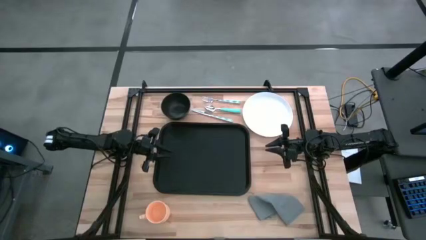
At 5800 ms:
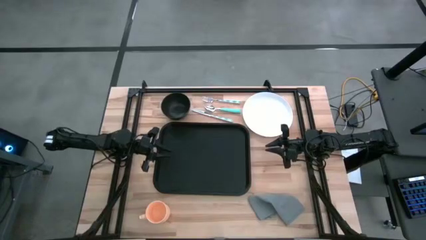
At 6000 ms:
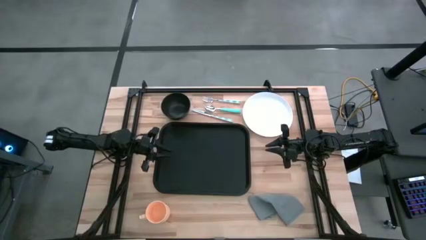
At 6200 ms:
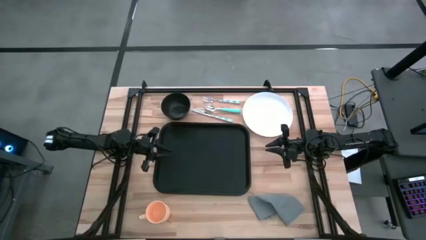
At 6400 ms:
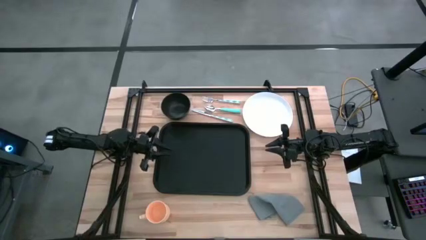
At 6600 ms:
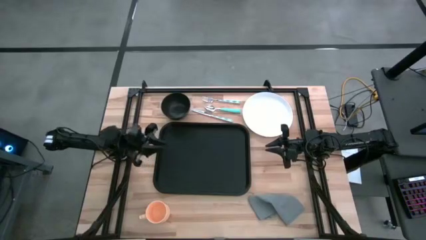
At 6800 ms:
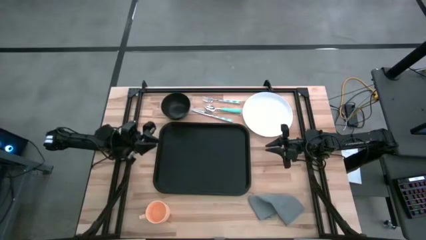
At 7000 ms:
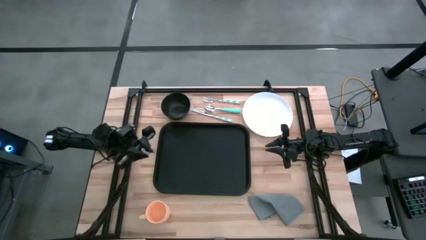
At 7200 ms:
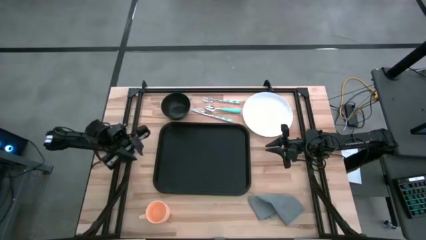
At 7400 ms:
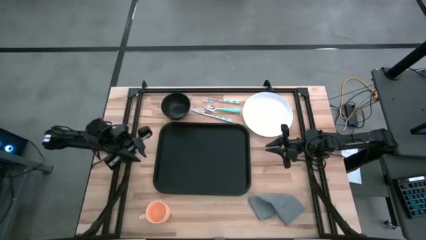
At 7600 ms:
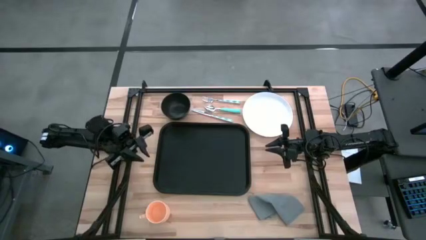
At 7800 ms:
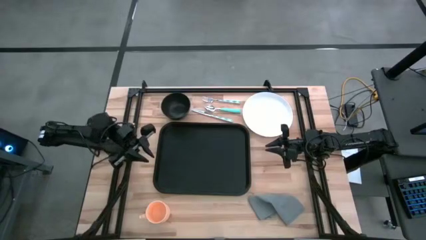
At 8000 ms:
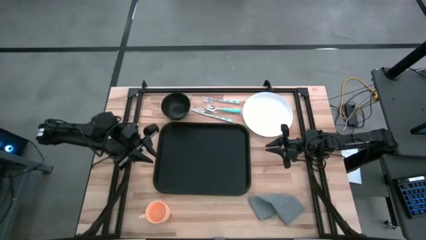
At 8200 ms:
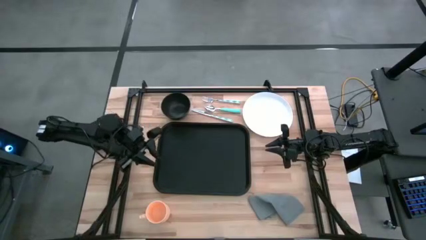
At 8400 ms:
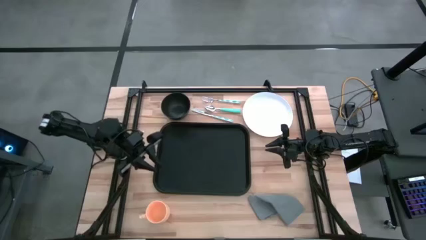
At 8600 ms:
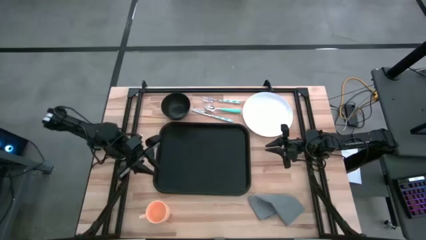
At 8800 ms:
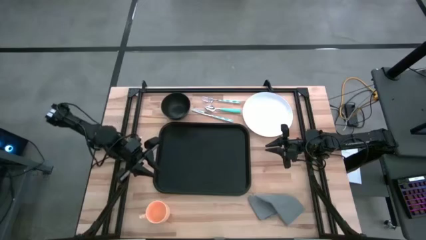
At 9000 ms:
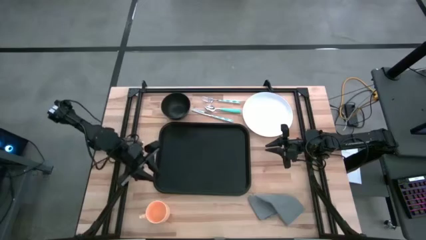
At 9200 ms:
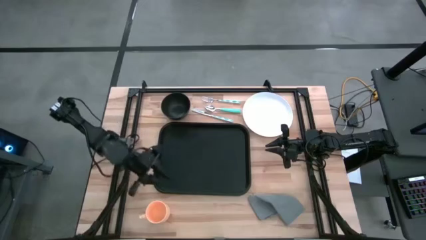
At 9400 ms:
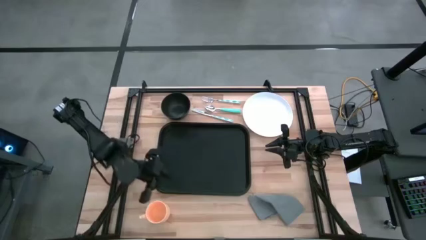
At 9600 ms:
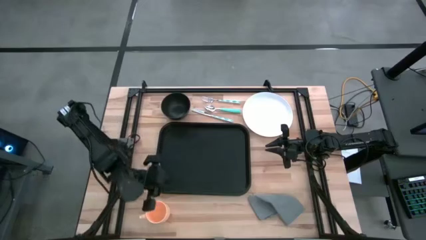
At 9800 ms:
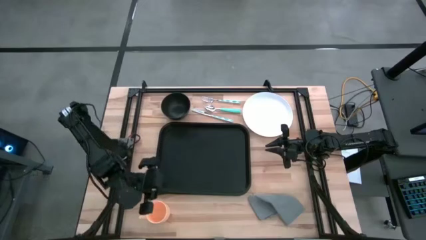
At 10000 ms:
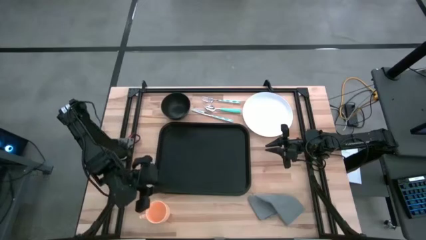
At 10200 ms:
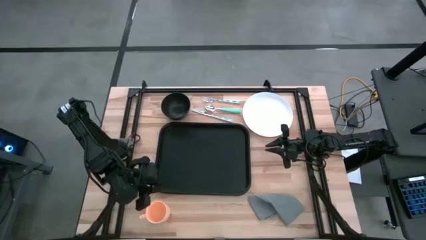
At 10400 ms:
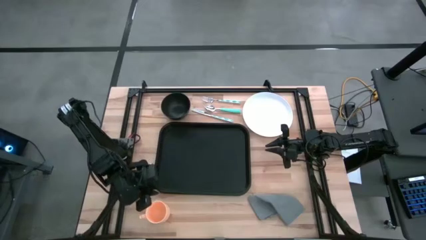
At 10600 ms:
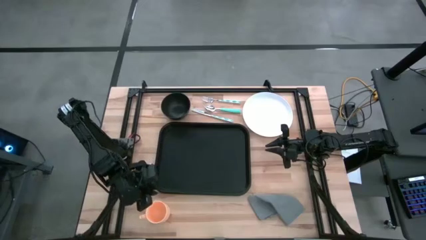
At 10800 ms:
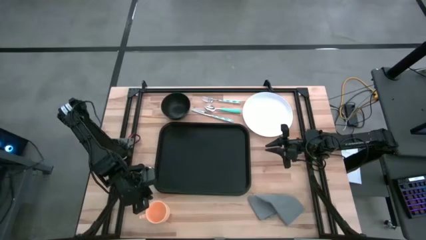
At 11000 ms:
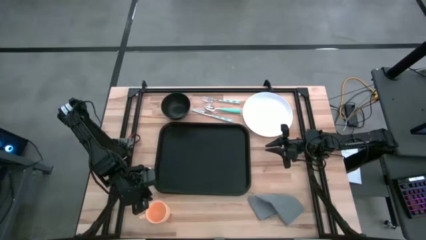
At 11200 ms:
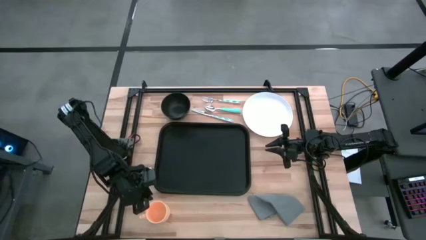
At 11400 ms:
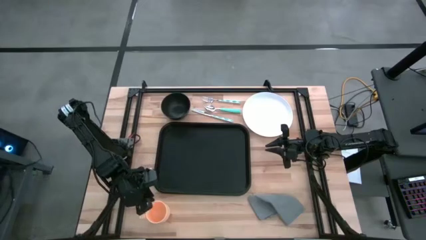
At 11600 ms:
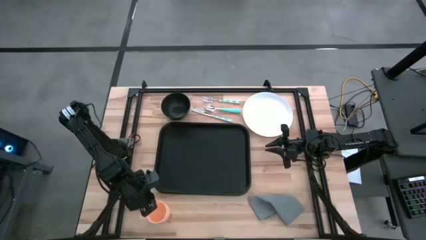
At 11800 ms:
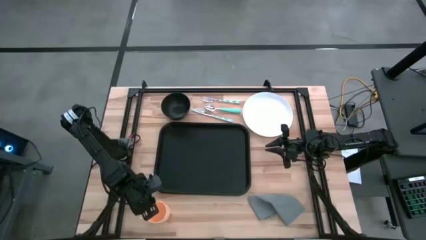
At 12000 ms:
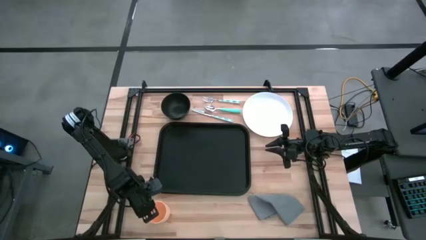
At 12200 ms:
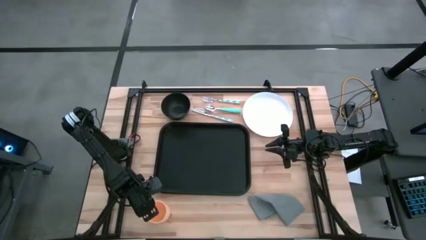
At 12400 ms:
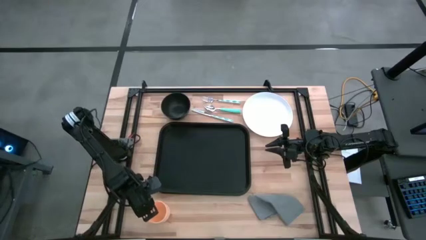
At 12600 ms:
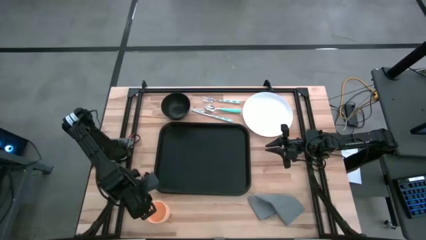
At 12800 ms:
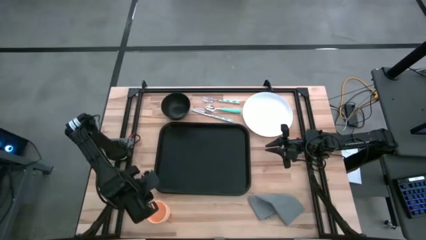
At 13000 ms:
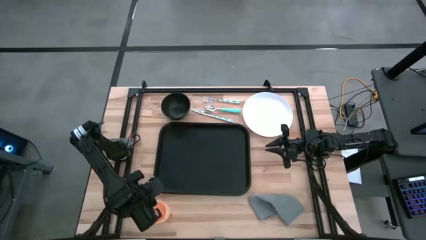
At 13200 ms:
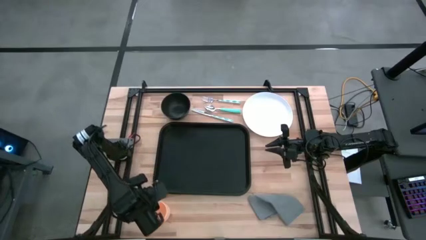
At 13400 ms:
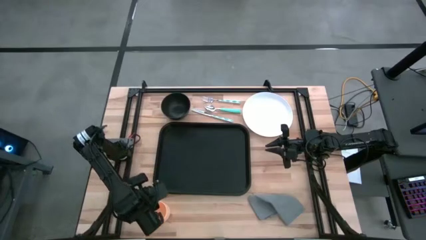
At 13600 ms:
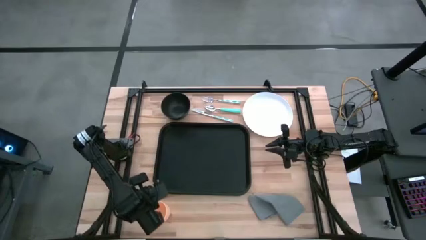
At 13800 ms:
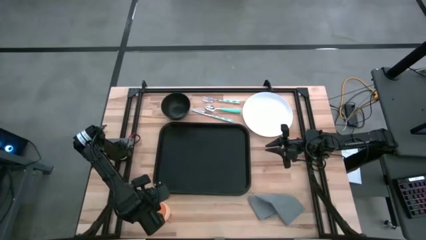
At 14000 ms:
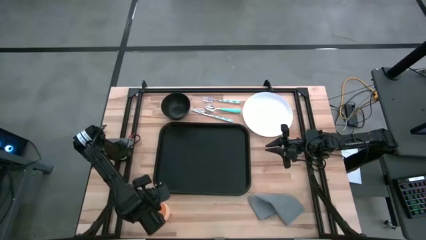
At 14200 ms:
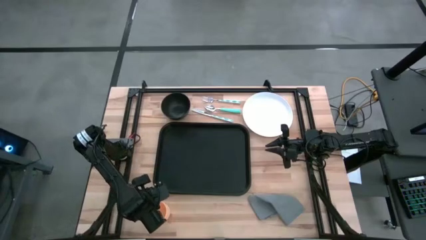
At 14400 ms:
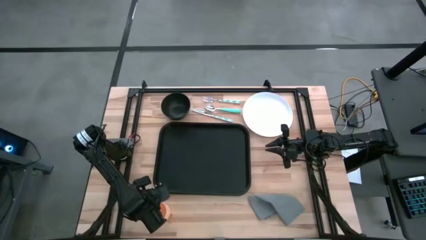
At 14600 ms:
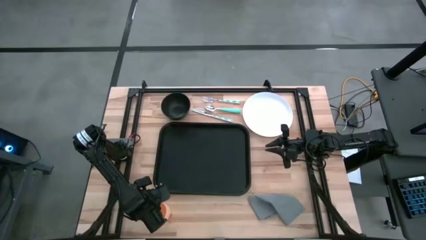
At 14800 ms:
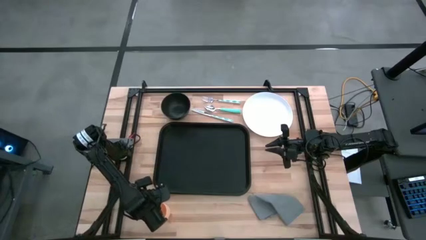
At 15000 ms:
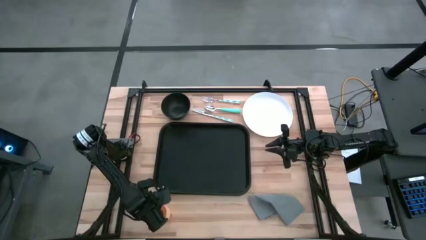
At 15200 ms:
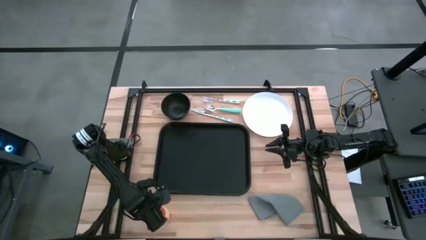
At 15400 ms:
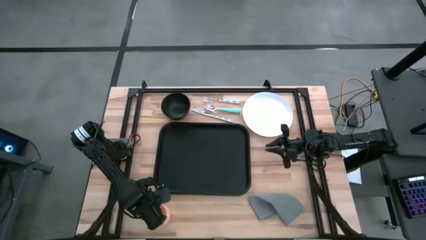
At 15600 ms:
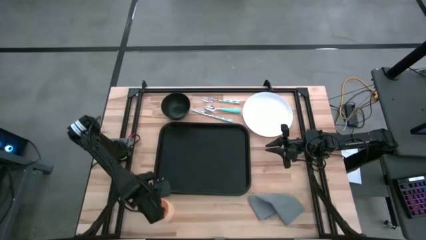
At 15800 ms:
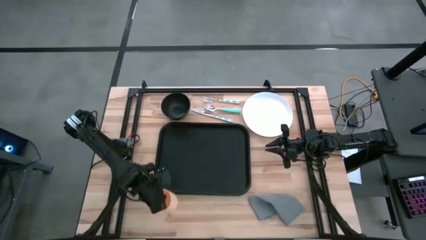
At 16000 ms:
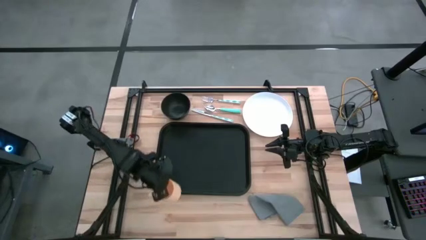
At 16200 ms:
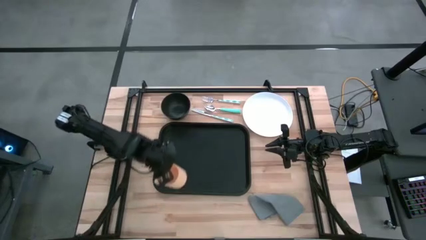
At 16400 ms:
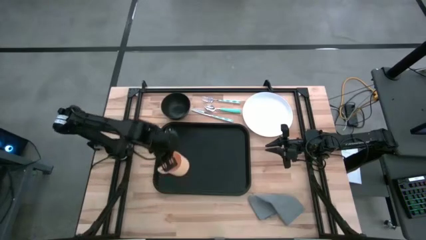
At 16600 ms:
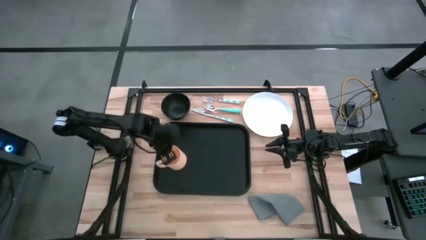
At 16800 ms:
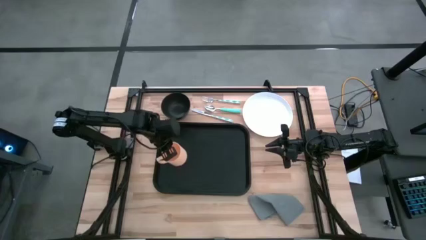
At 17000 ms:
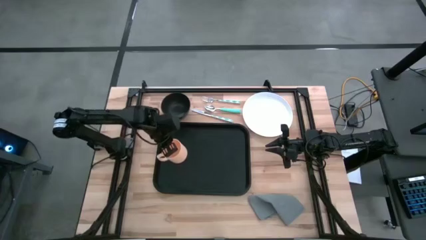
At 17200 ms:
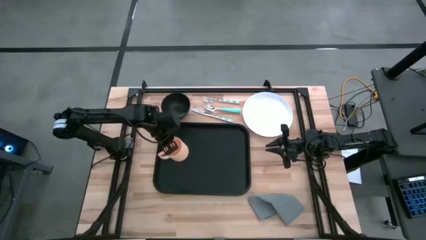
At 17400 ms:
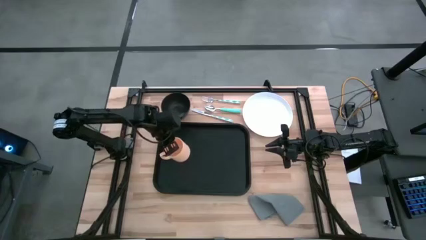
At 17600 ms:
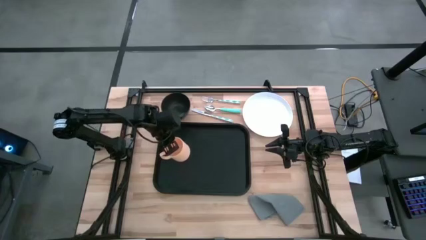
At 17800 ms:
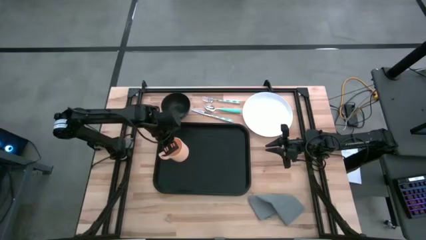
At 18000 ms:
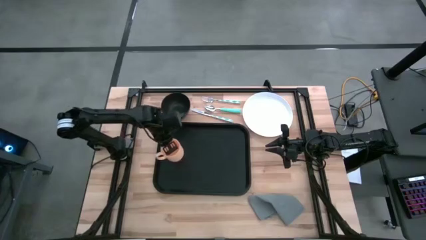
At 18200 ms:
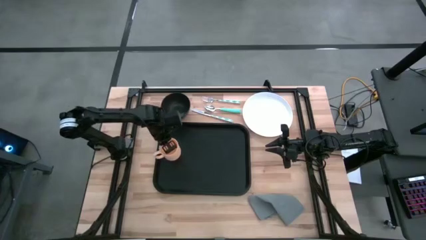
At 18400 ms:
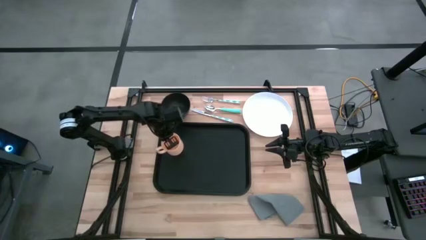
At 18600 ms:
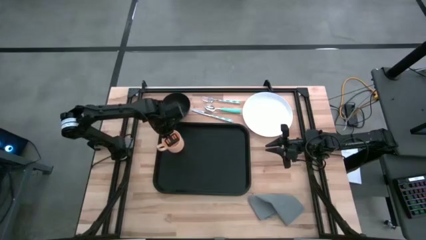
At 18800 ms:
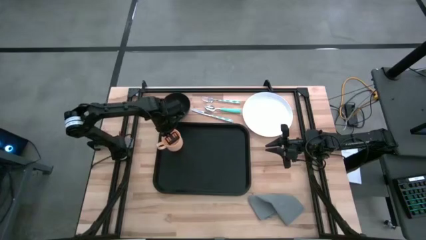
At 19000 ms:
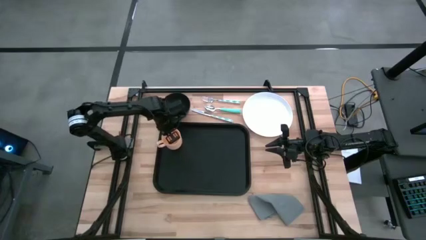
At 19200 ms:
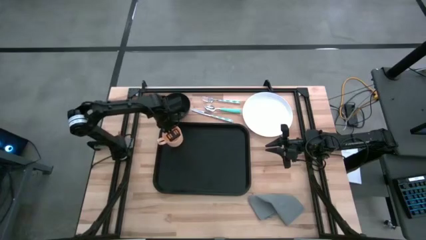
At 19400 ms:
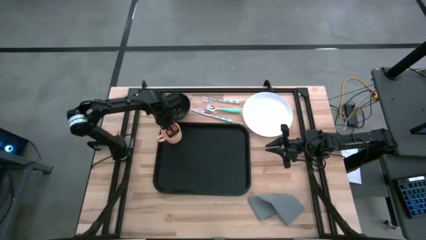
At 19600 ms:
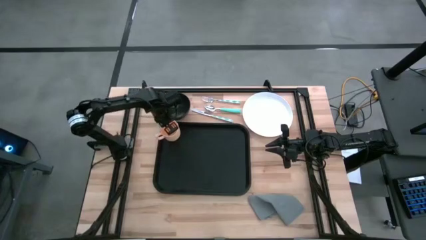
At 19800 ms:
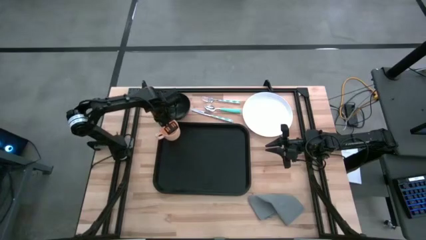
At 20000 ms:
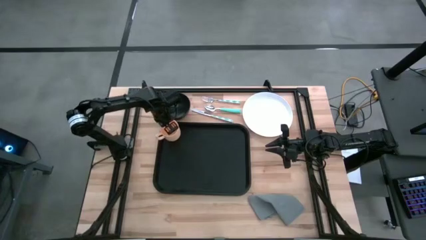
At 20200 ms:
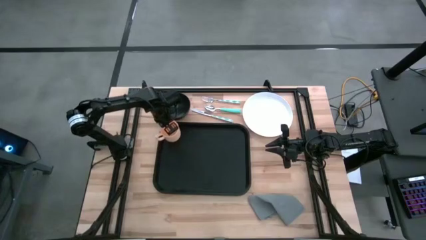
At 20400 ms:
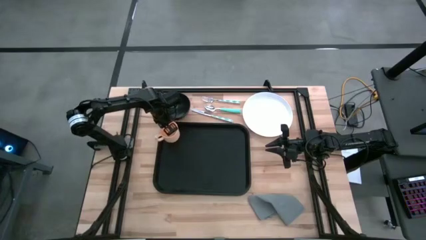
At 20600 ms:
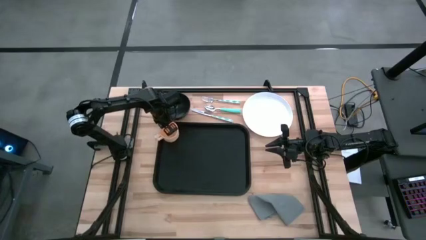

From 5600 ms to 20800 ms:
Task: Set up tray
Put the orange mug on the black serving tray
